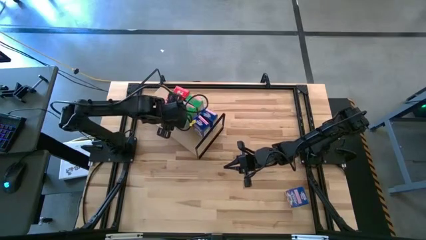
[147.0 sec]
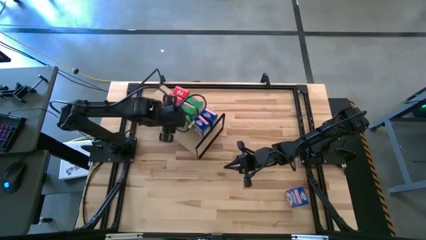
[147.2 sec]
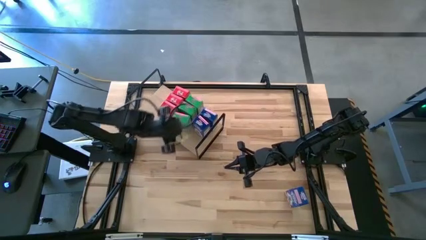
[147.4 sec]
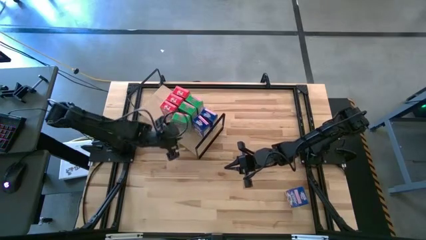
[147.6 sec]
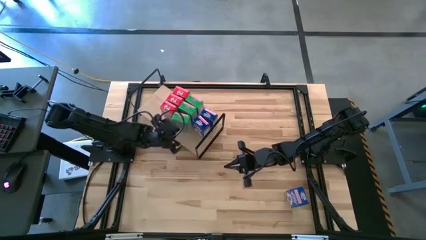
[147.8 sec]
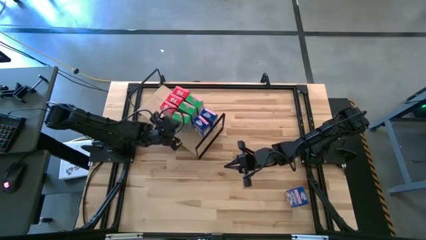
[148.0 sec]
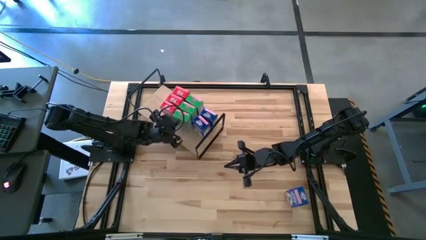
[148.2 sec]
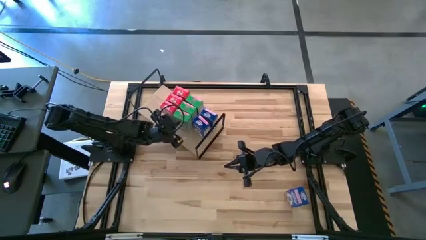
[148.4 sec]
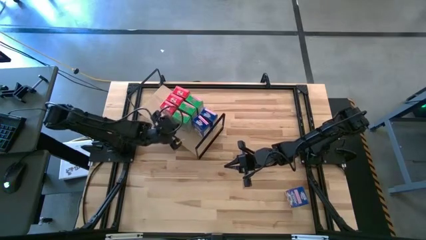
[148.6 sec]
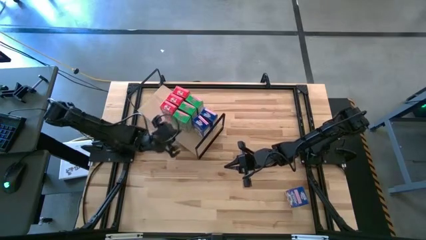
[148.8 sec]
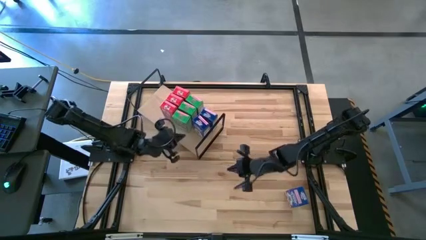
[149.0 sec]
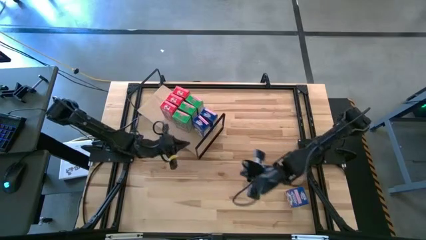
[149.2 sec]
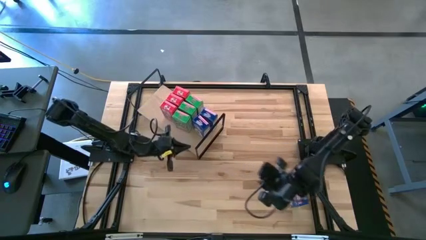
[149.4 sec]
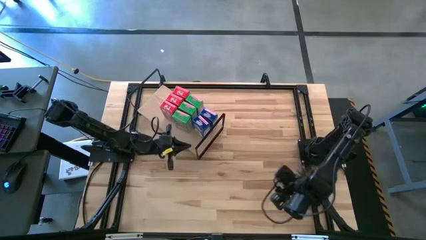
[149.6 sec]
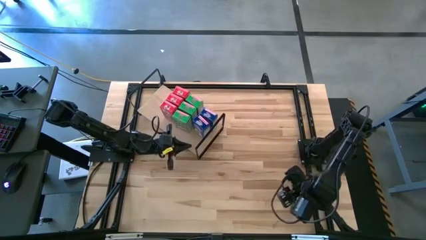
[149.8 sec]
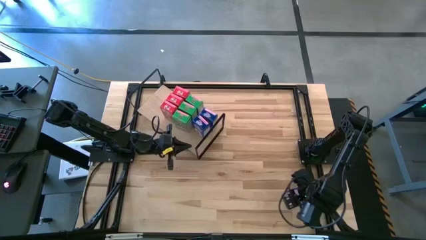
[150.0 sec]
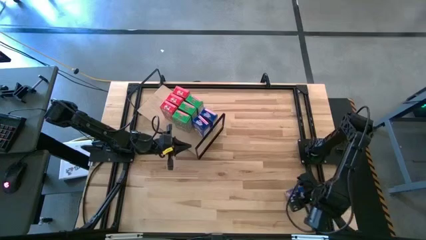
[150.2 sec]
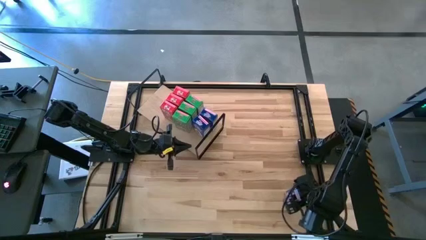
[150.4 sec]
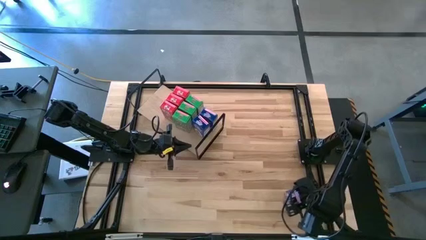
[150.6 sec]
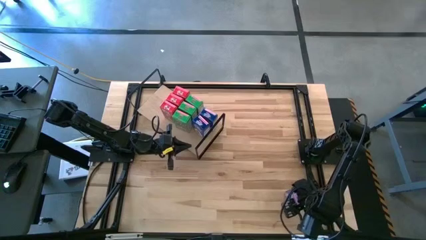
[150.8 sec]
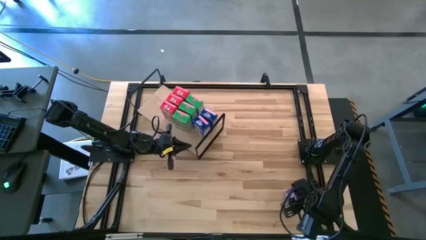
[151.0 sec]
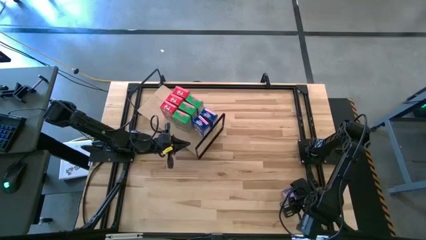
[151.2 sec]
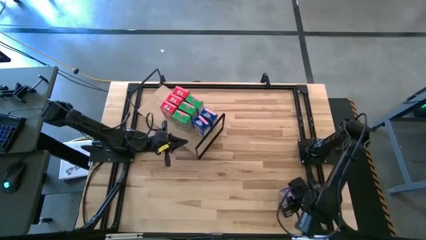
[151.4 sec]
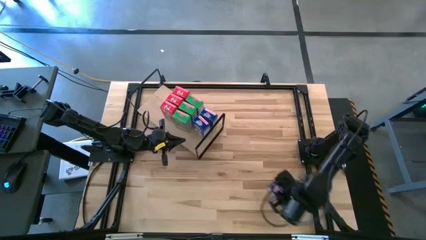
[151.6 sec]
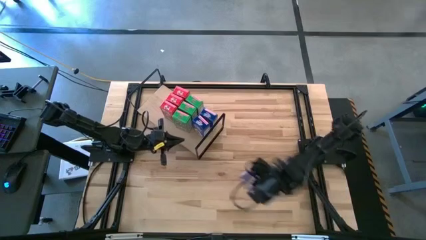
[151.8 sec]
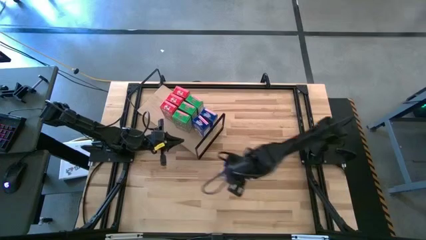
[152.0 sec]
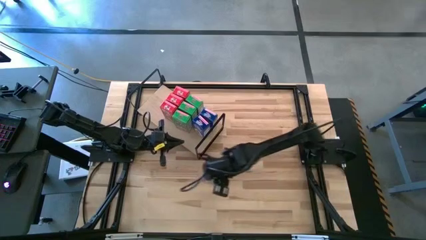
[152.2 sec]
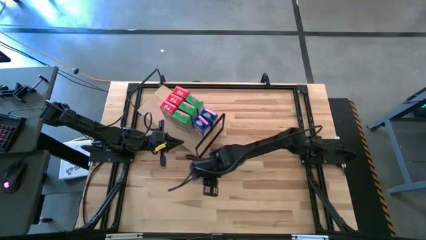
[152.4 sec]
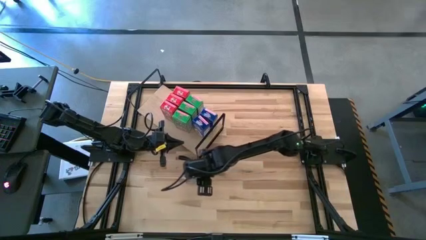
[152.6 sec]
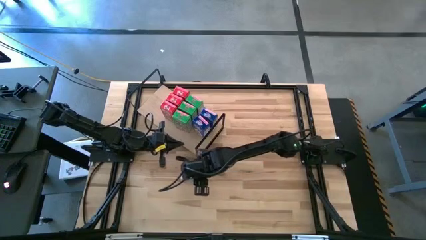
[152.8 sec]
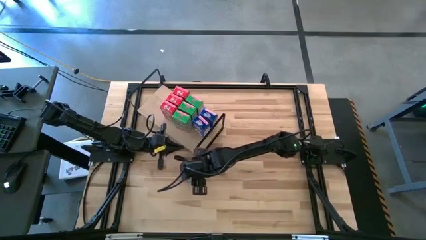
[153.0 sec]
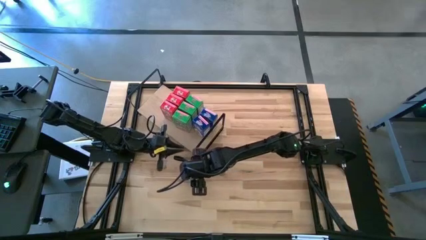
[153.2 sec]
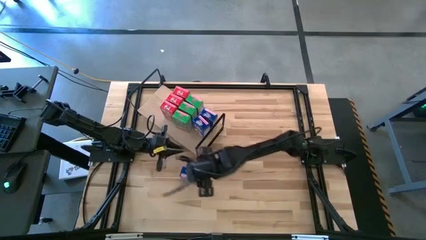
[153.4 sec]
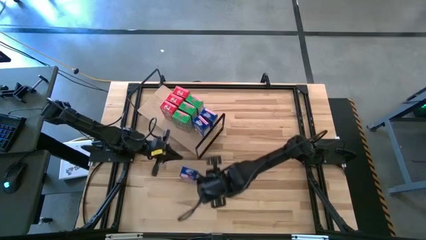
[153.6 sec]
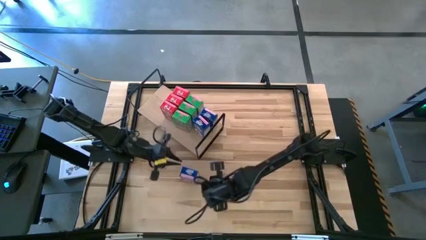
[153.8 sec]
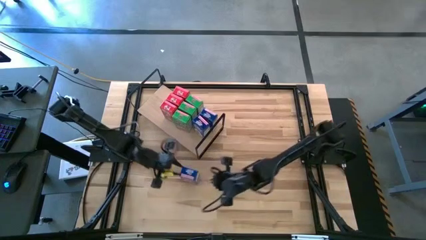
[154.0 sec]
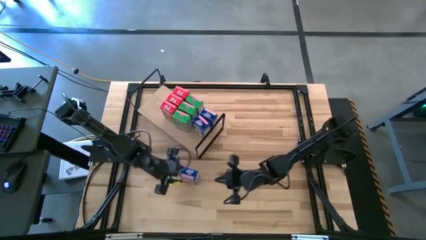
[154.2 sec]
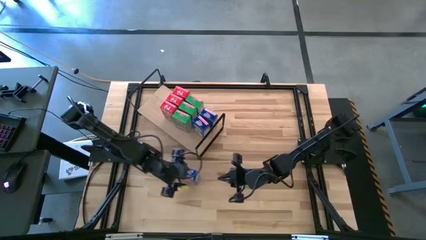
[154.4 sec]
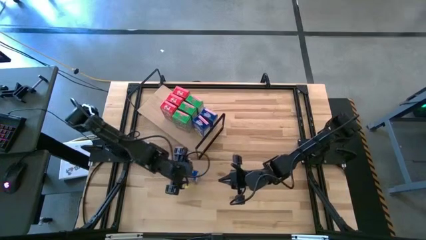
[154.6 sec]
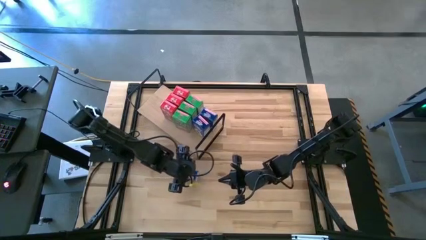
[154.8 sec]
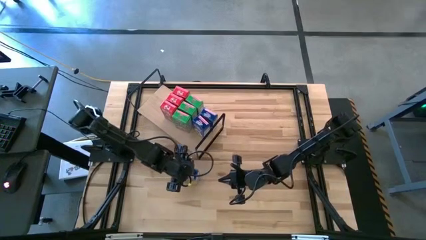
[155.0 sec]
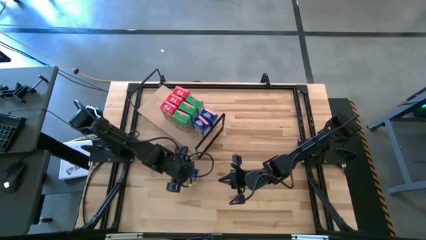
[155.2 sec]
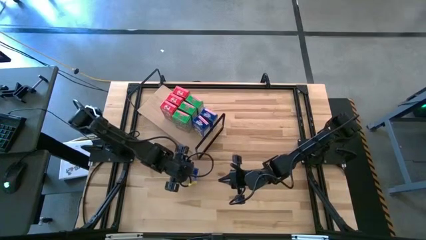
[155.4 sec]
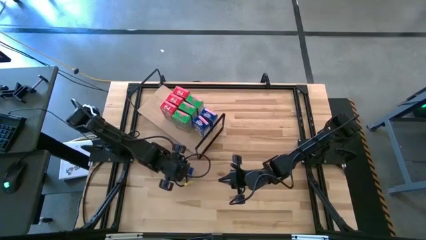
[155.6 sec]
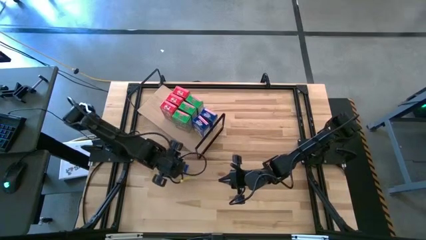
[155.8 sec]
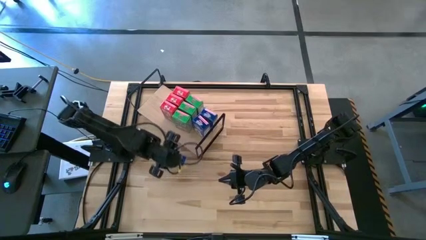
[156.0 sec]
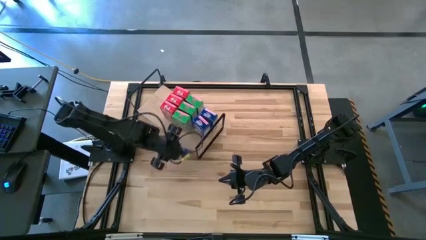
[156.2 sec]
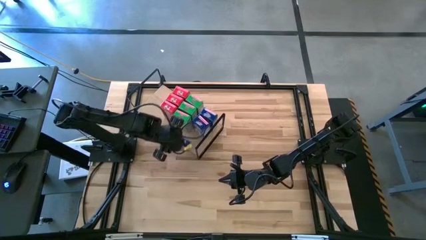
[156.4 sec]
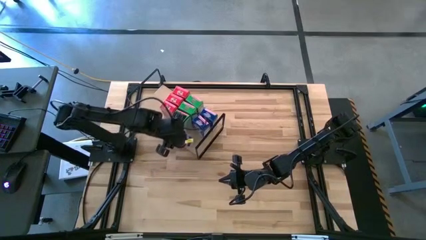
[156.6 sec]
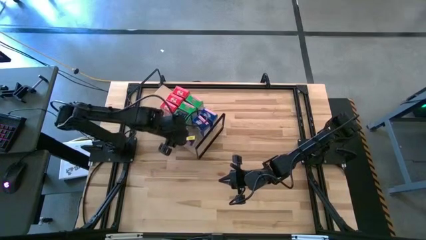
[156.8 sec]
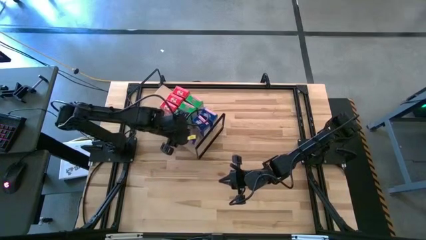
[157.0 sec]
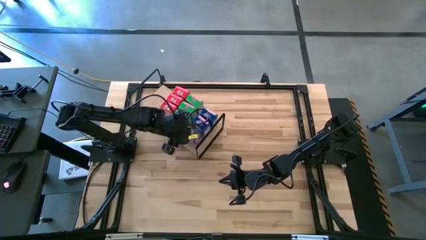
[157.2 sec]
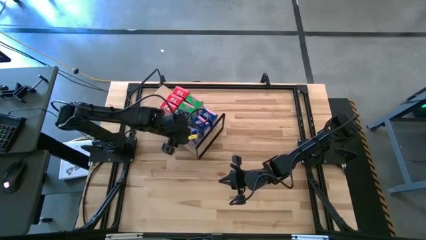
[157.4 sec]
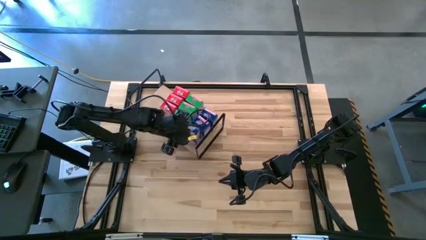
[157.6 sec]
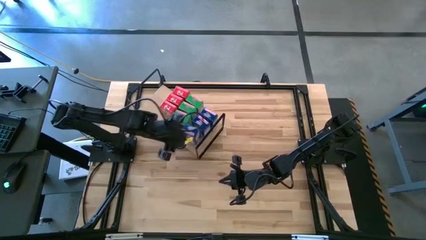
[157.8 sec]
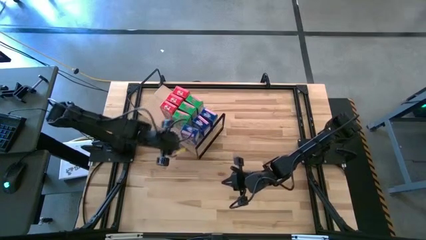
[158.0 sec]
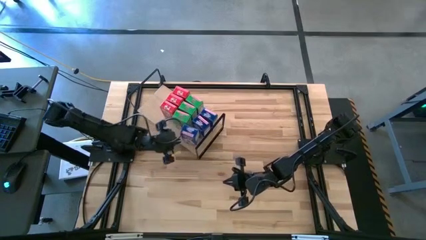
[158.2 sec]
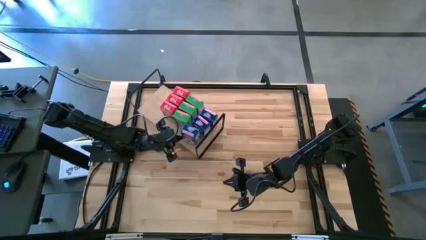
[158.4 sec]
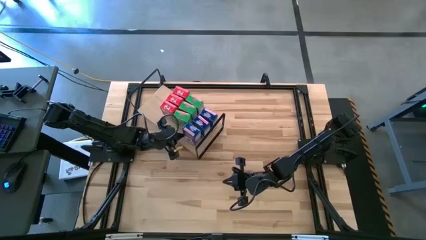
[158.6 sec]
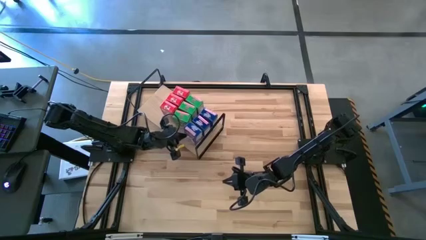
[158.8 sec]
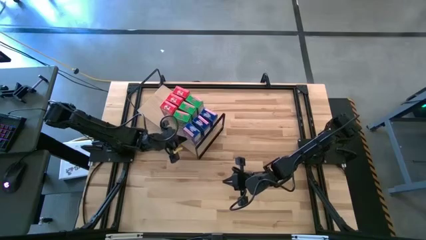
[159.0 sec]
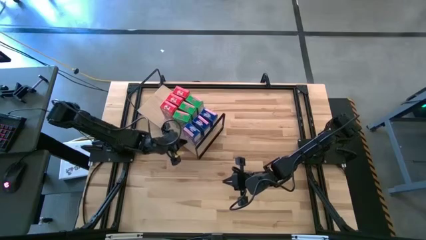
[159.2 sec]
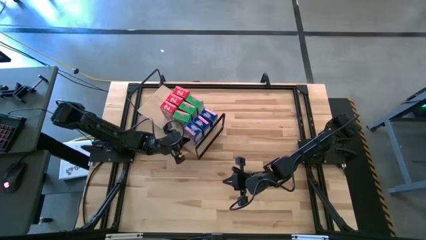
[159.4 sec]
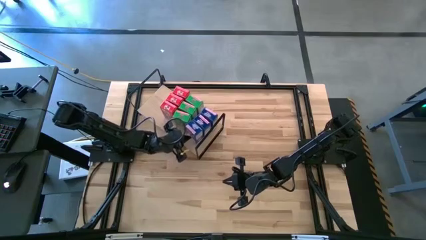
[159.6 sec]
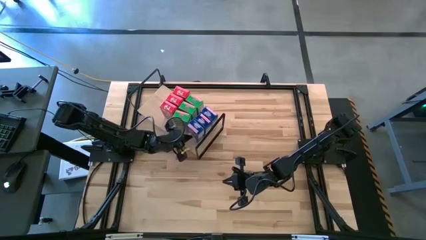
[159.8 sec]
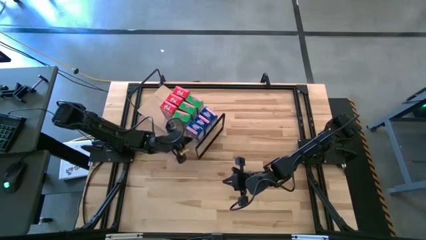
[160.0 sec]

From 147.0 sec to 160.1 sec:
Task: Stack cereal on shelf
Put the blue cereal on the shelf

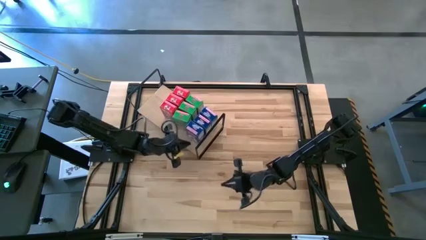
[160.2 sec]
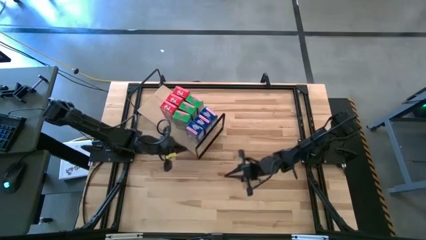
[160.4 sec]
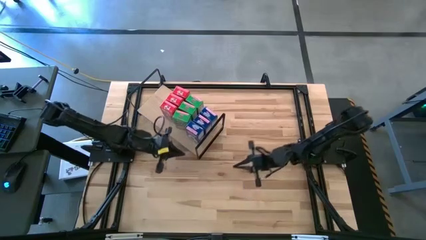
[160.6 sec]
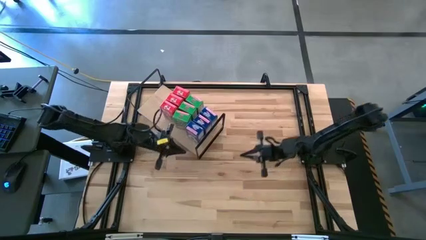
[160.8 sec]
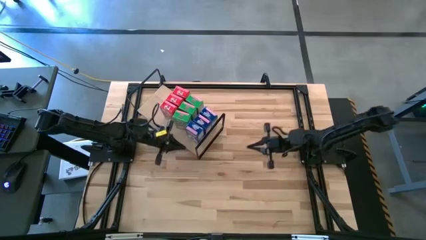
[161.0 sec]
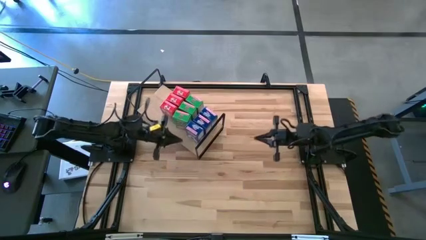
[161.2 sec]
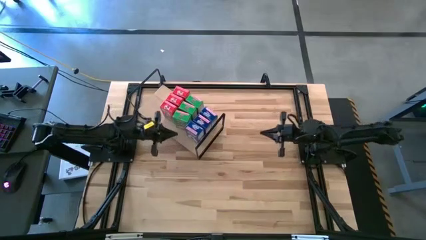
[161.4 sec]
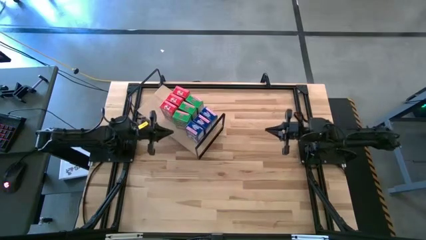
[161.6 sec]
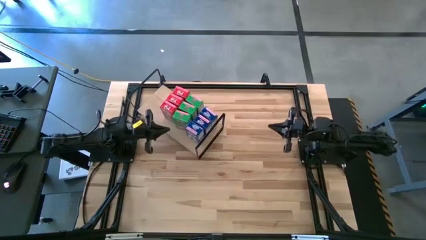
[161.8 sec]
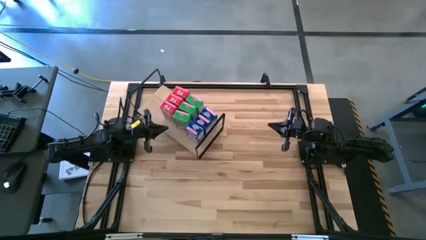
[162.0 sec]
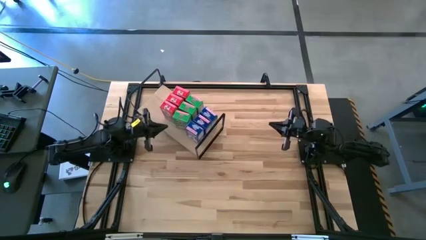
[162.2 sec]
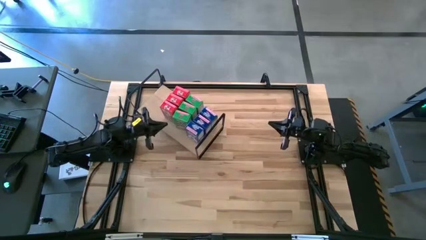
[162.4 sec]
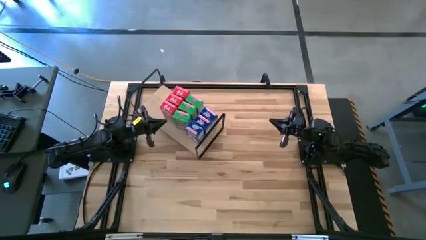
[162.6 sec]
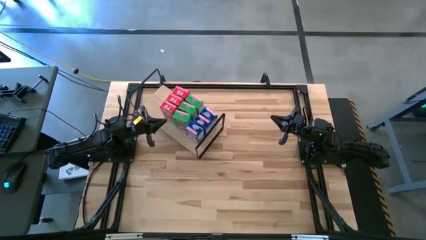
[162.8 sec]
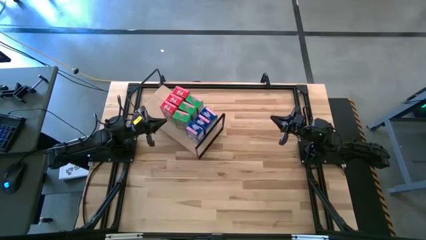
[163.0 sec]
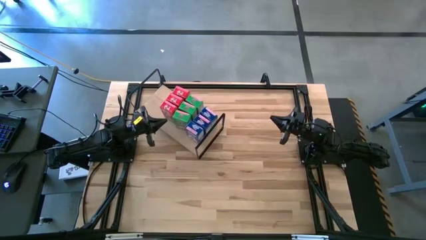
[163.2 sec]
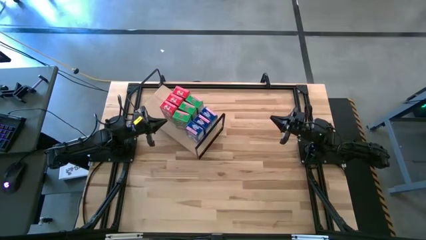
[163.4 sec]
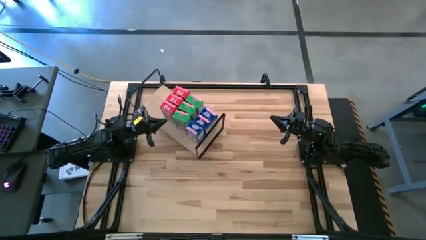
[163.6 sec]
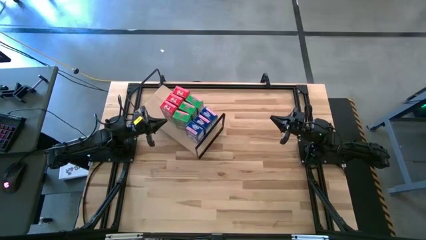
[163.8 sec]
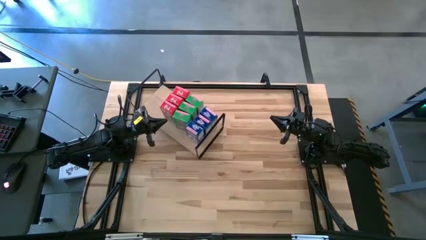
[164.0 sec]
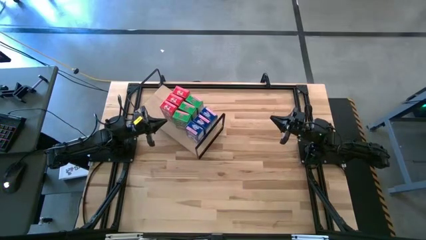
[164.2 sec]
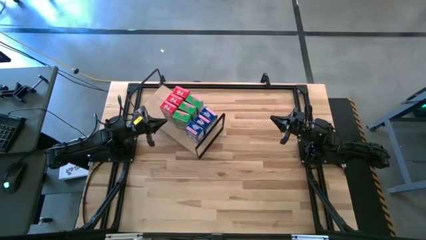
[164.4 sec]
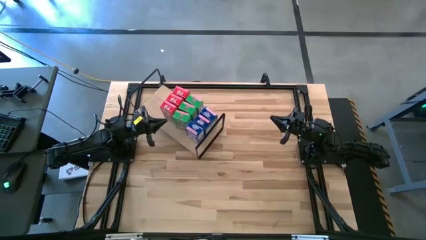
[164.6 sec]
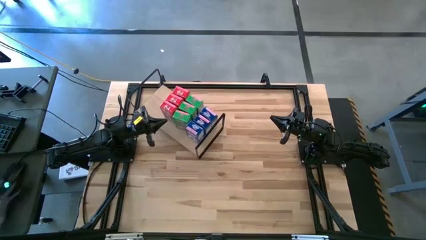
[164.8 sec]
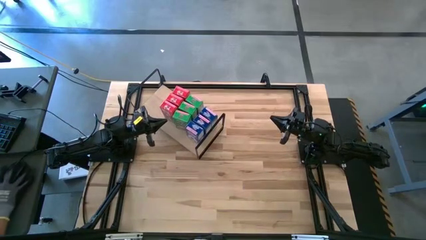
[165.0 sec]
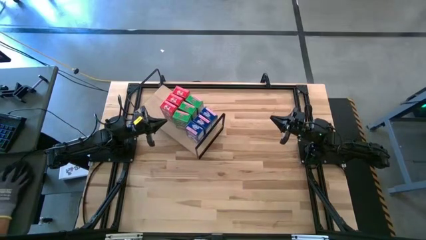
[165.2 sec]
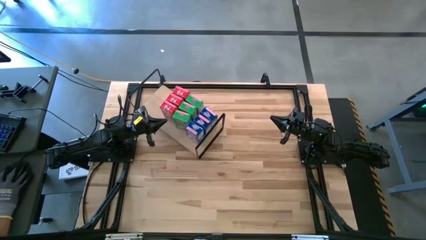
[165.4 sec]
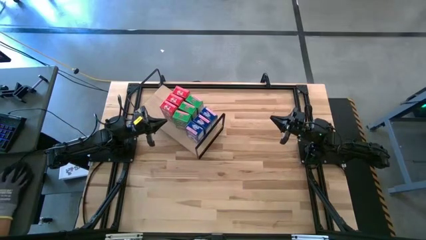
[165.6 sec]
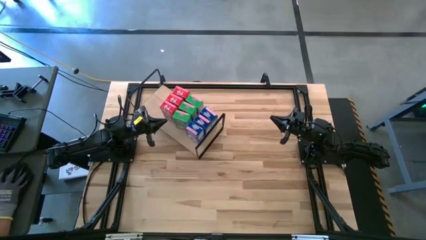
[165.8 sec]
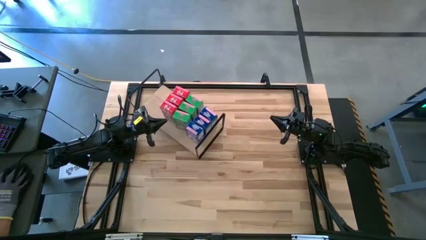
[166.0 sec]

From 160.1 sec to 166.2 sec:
Return to Home Position
